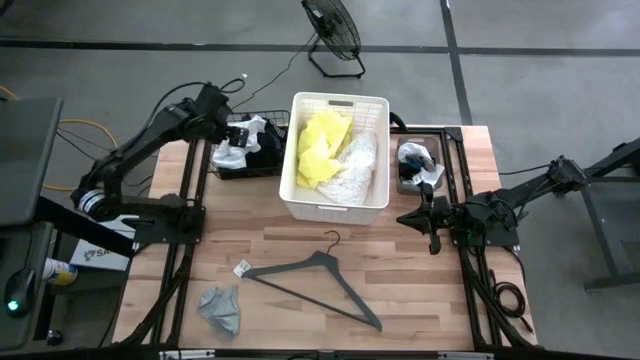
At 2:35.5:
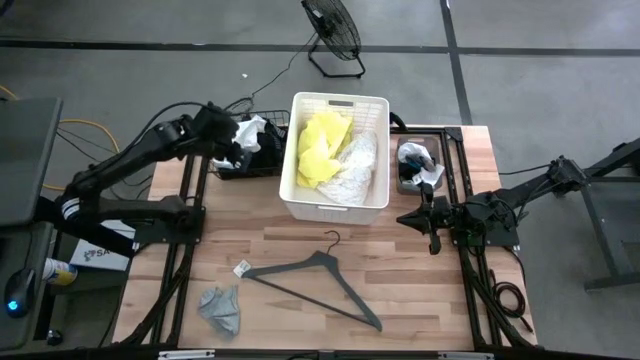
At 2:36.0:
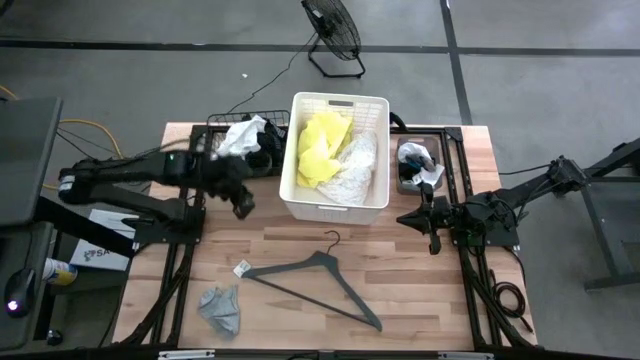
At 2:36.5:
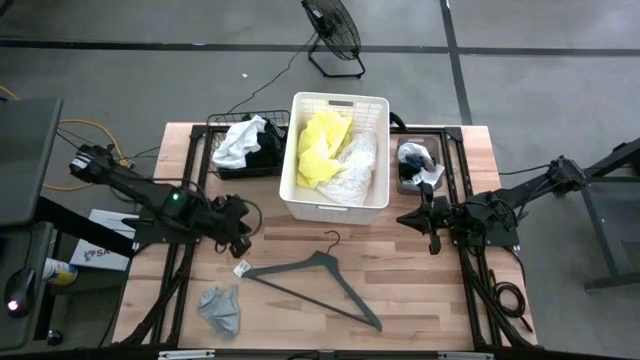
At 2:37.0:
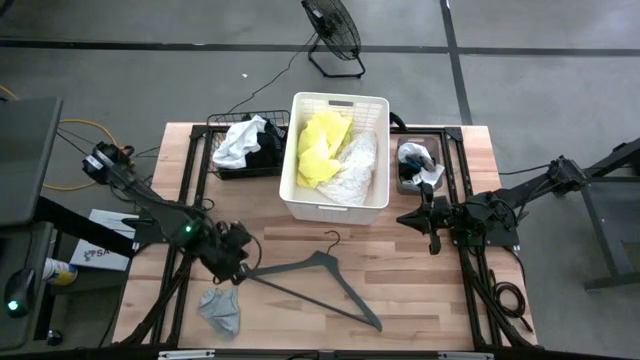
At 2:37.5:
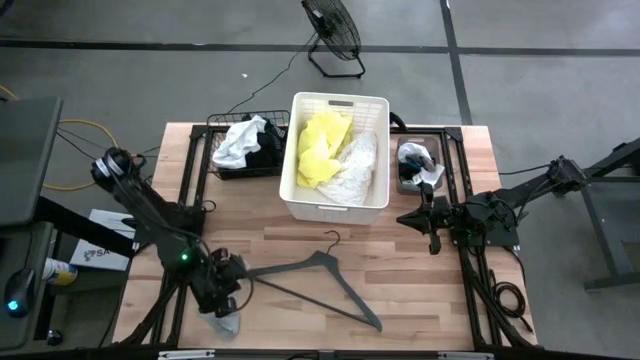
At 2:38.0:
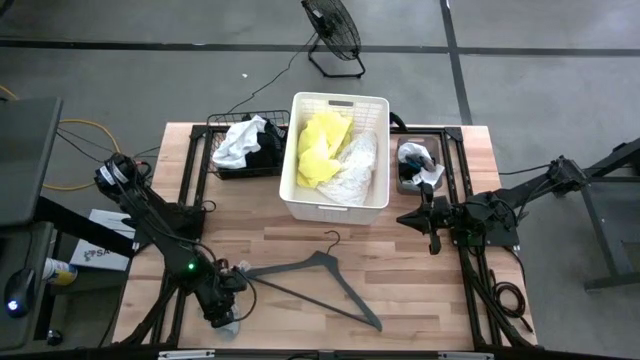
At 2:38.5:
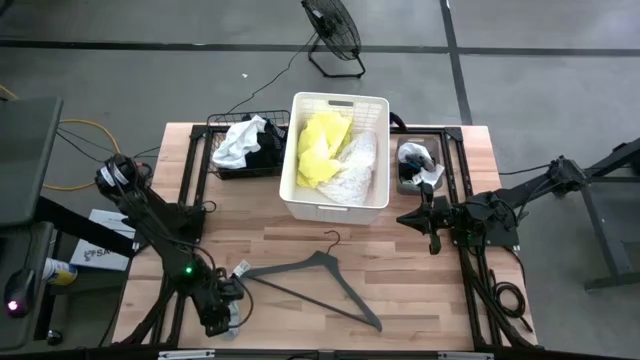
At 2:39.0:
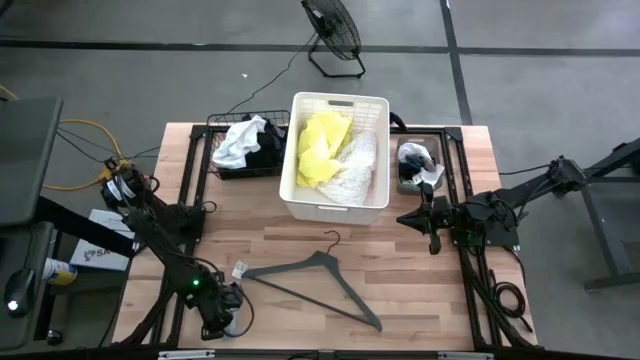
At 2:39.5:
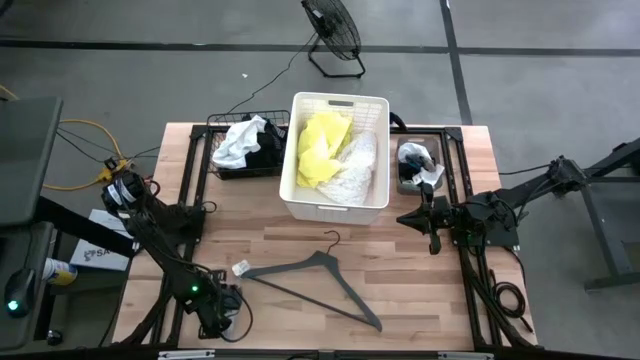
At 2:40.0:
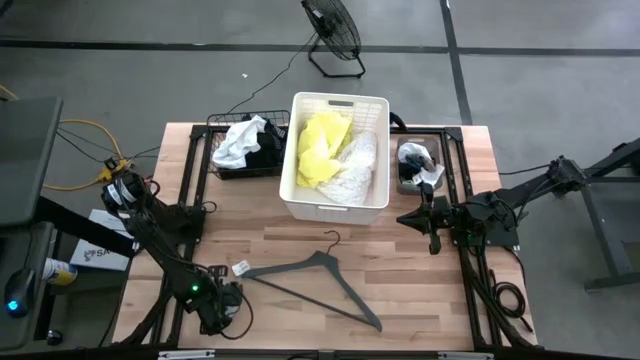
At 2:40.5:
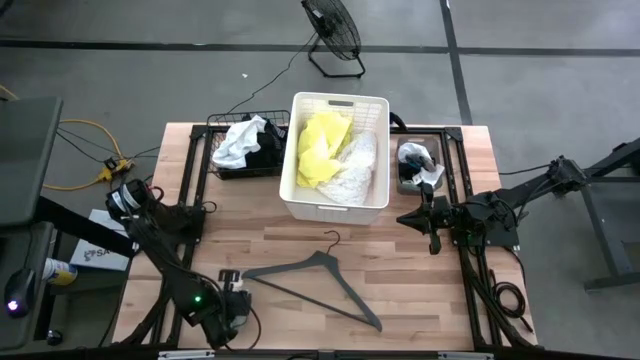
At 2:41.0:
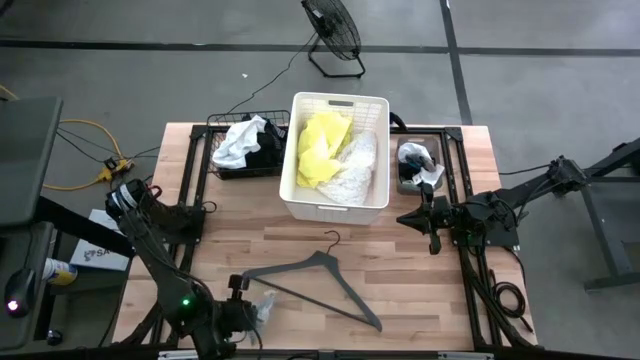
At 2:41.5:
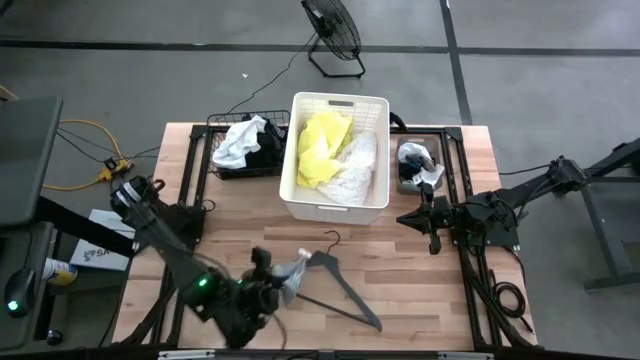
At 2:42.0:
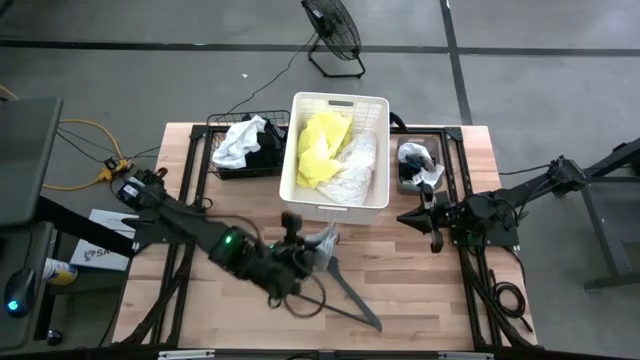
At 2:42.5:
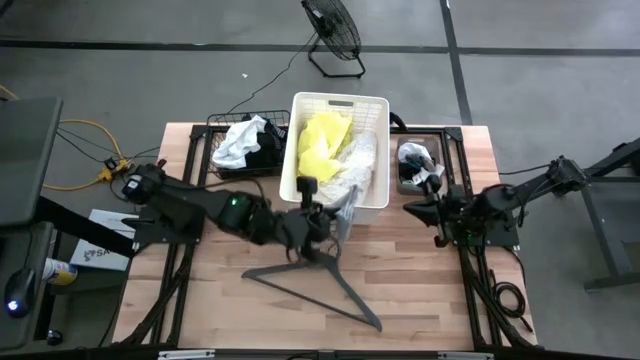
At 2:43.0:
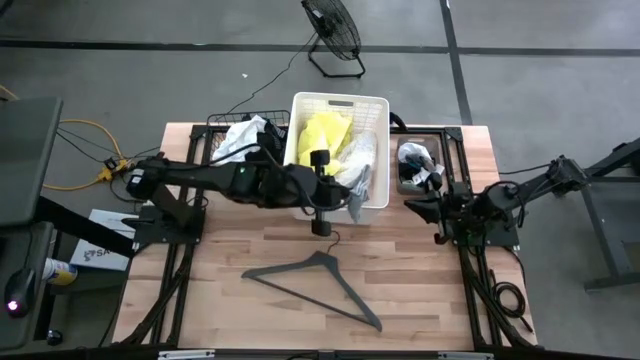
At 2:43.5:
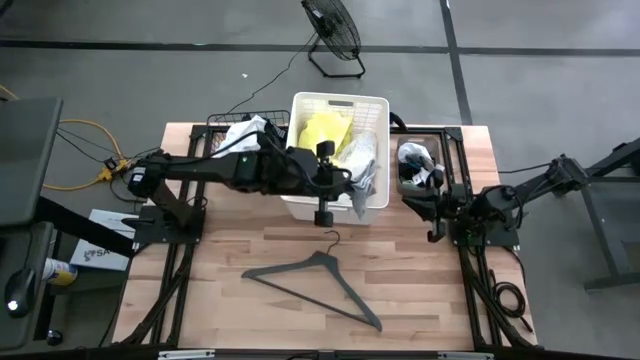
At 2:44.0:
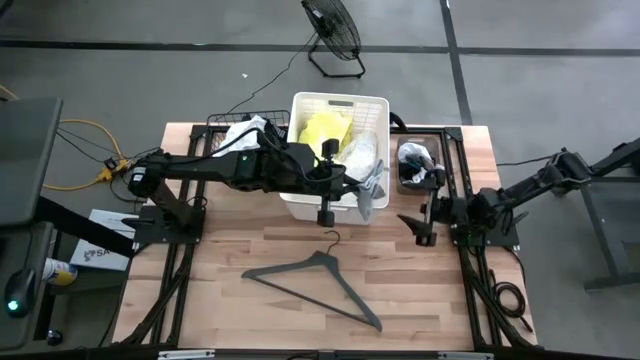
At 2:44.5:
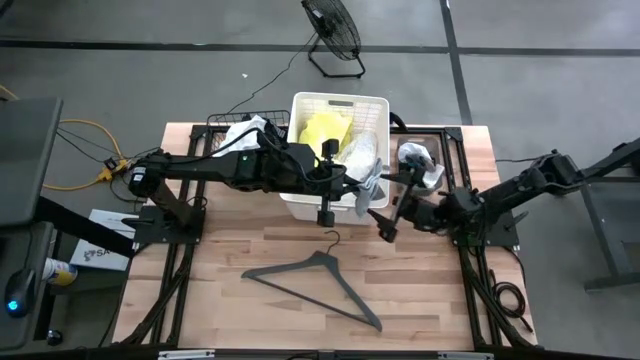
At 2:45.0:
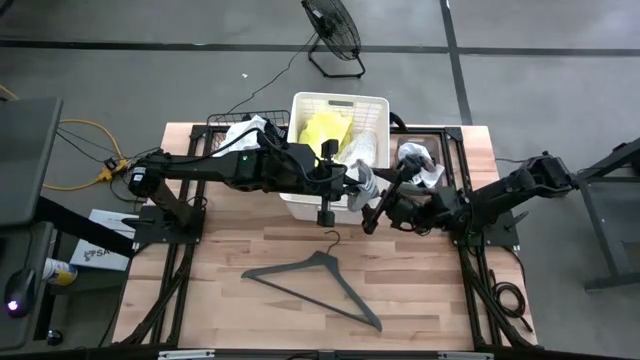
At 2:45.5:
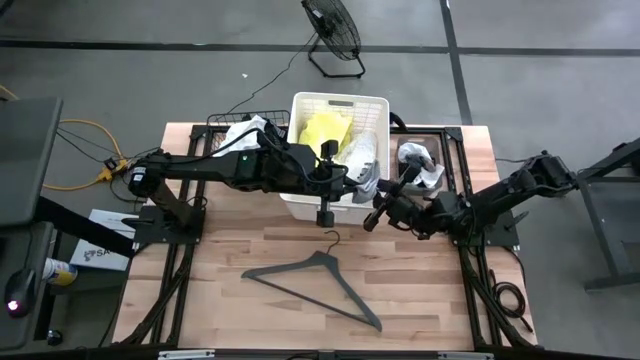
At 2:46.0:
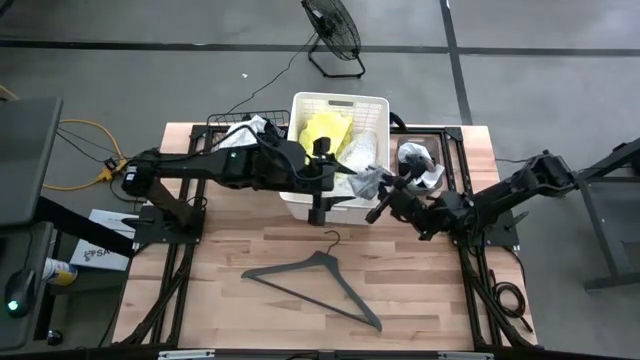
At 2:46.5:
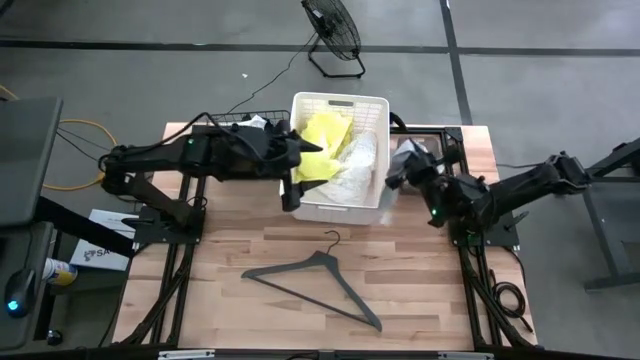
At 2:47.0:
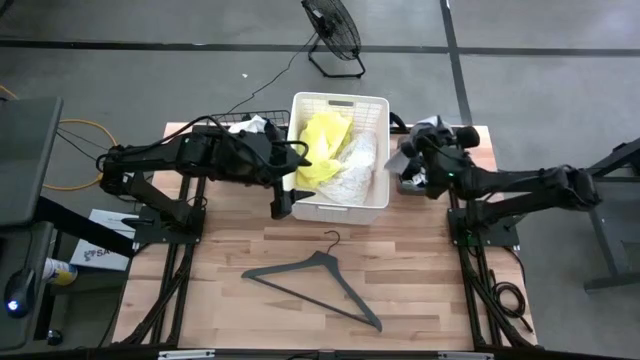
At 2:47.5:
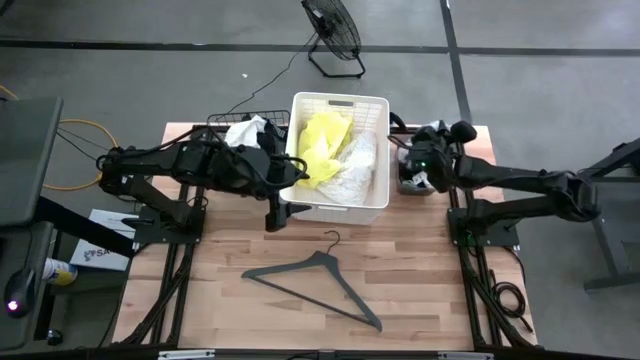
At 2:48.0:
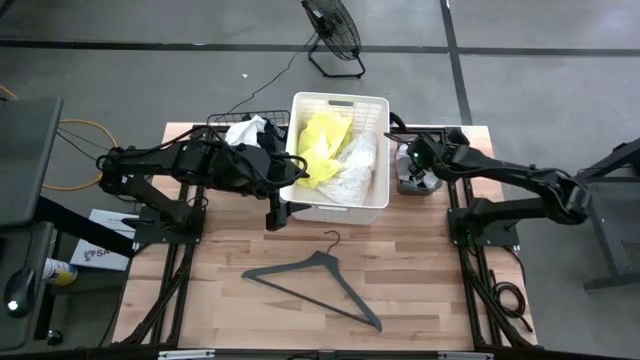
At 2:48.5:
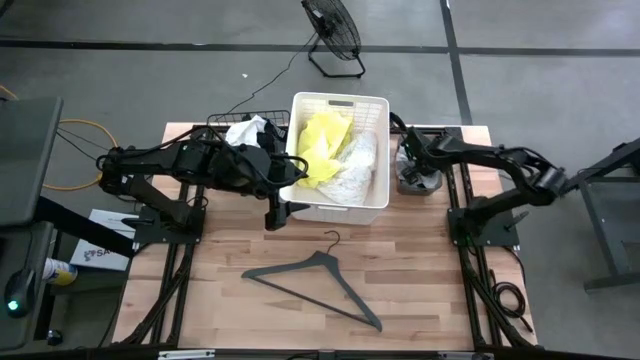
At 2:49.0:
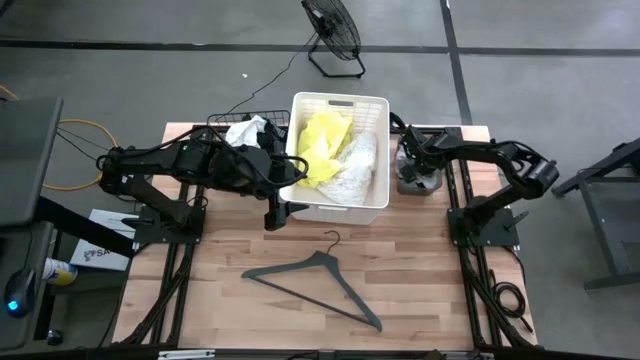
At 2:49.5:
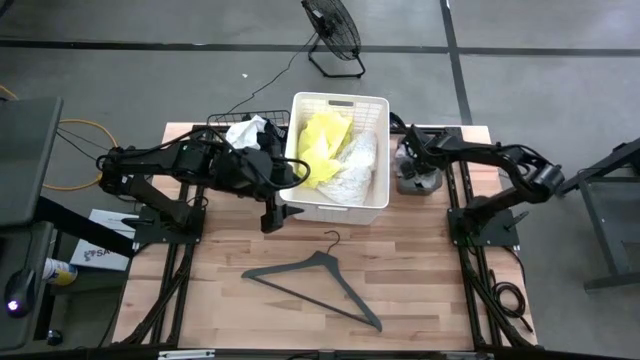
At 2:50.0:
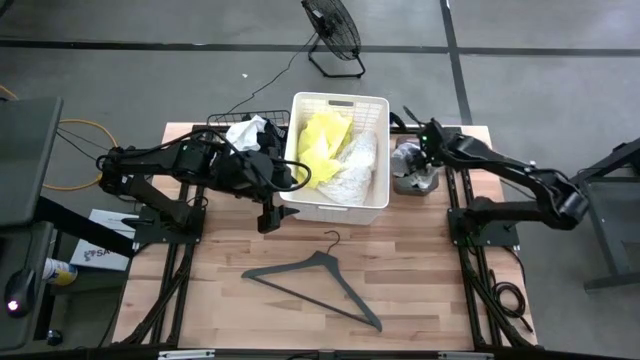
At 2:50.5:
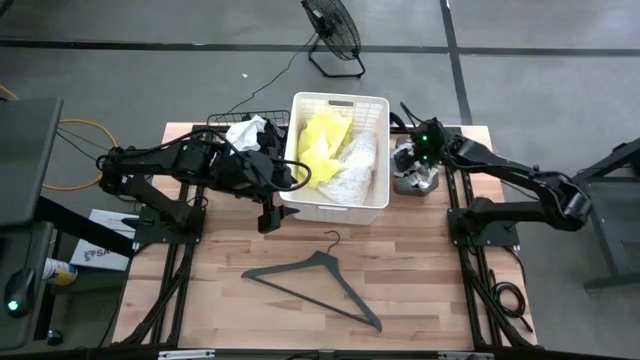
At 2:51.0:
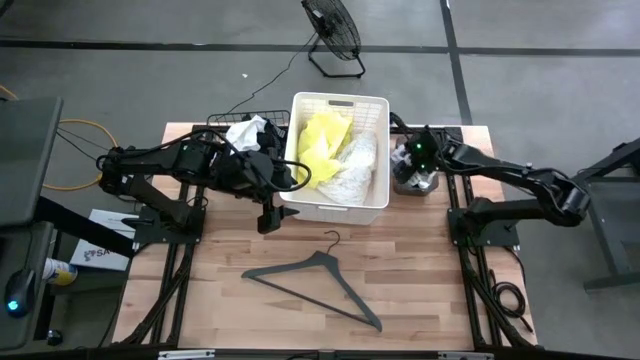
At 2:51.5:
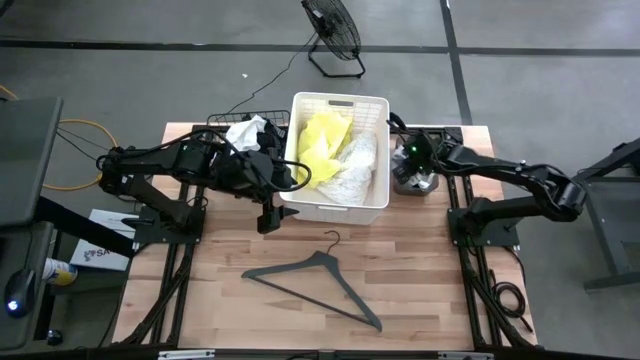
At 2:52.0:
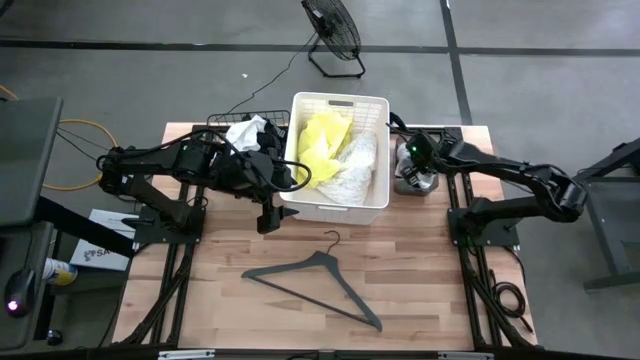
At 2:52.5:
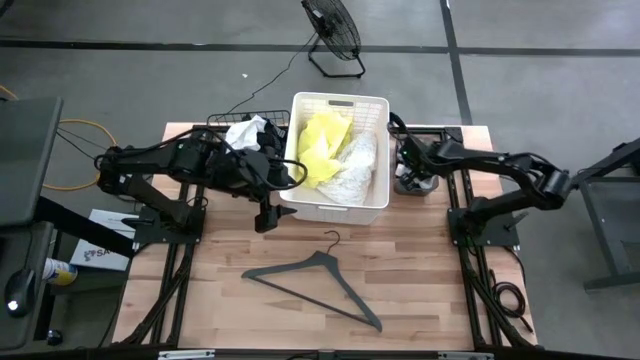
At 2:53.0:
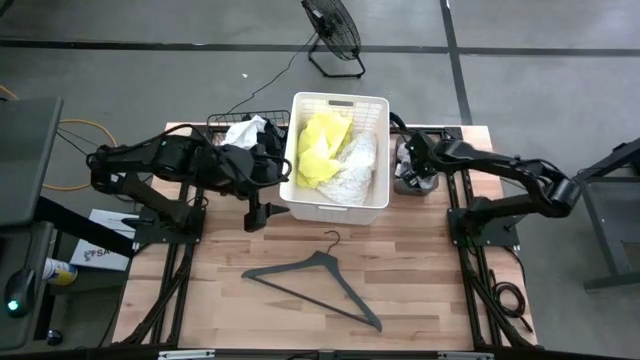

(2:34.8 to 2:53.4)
Task: Pick & Place Cloths
Put the grey sock into black bin

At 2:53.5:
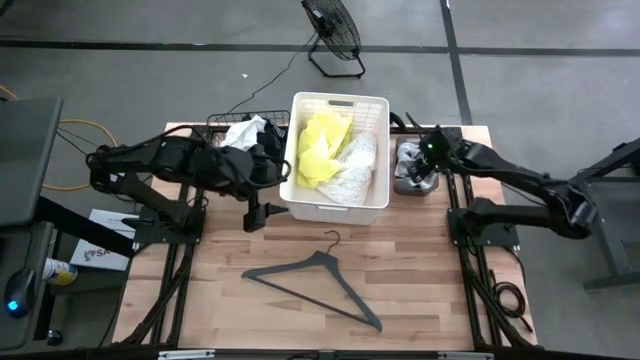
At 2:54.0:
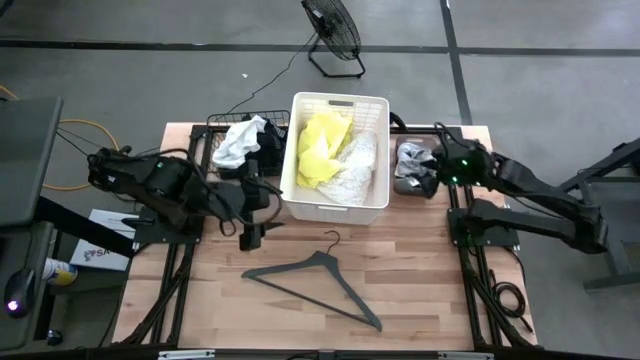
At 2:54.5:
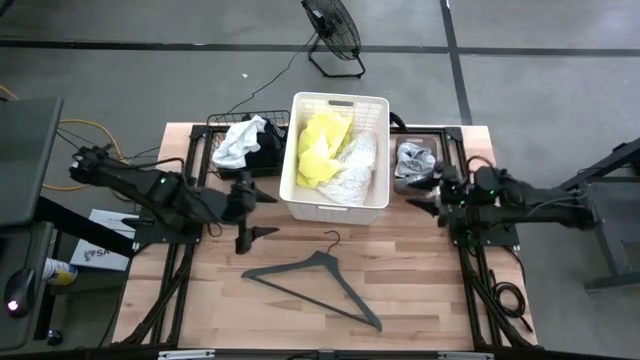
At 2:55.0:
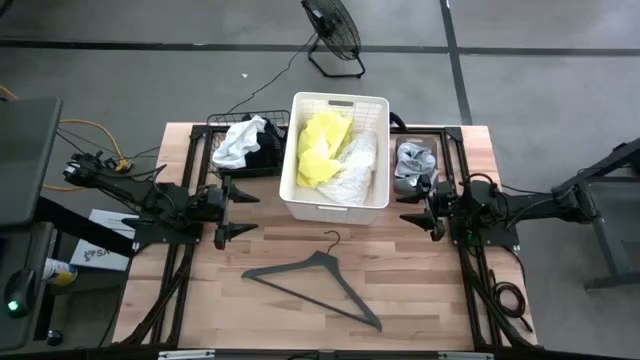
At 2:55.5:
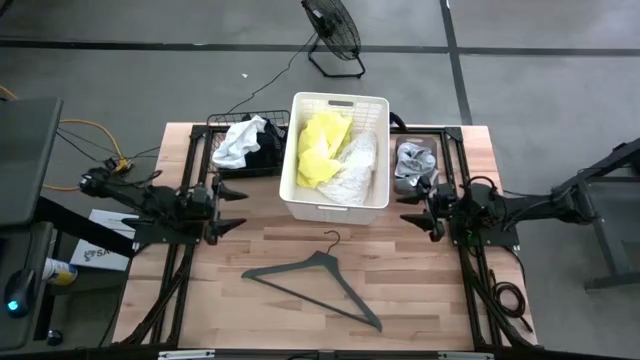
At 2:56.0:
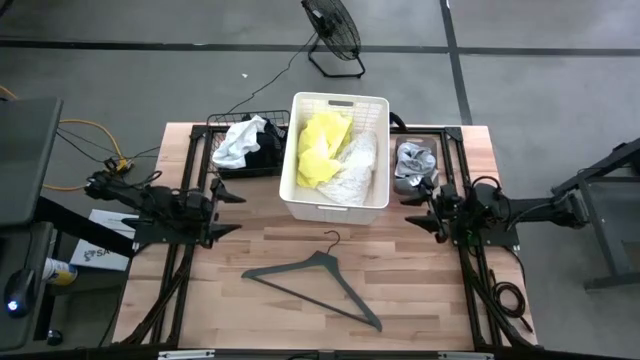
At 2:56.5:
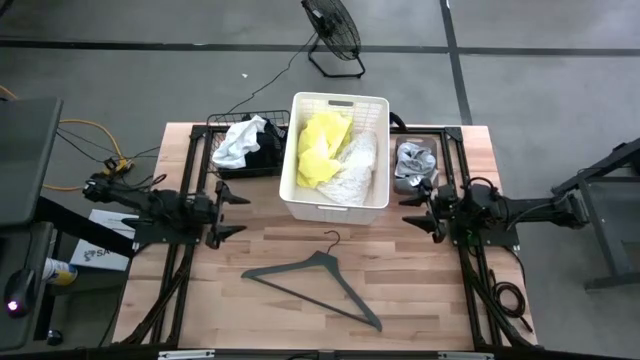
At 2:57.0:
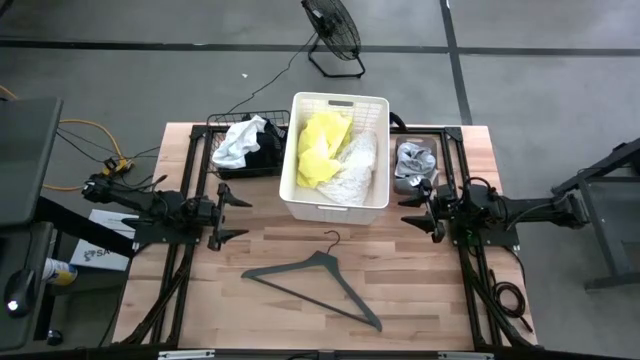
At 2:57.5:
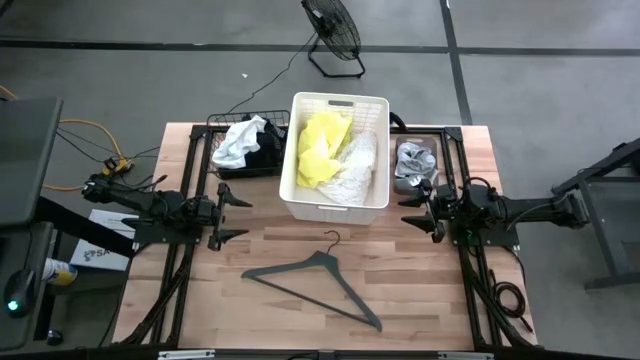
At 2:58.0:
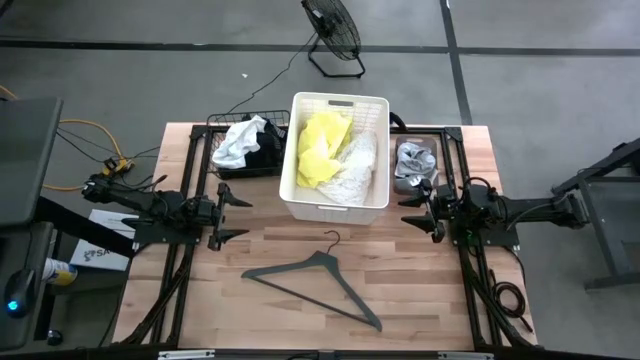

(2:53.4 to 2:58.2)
Return to Home Position
